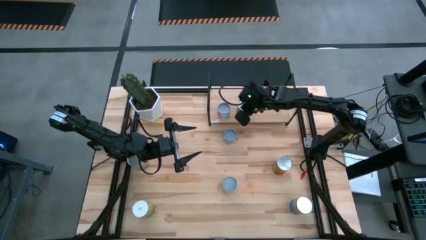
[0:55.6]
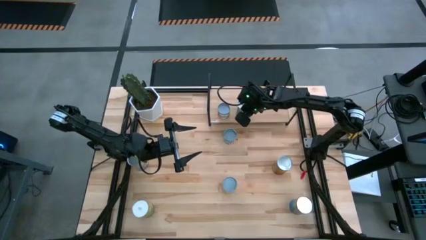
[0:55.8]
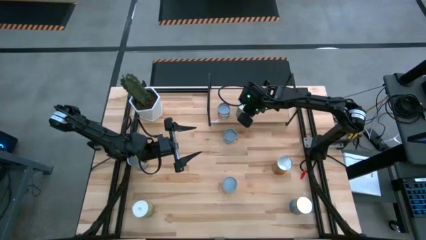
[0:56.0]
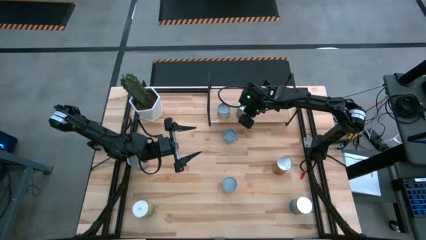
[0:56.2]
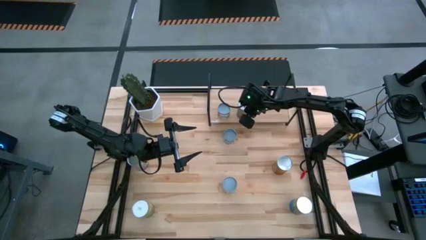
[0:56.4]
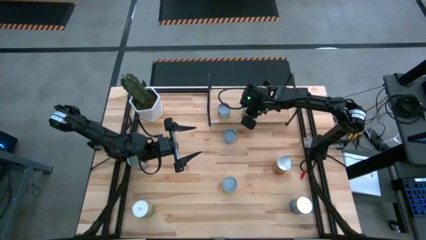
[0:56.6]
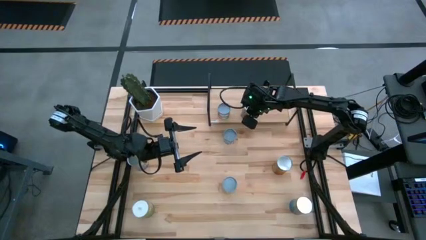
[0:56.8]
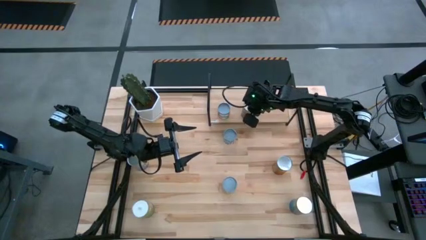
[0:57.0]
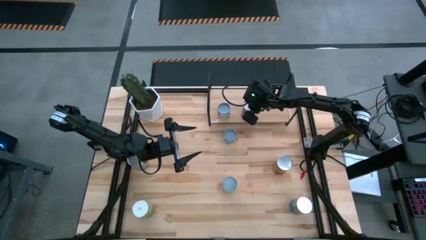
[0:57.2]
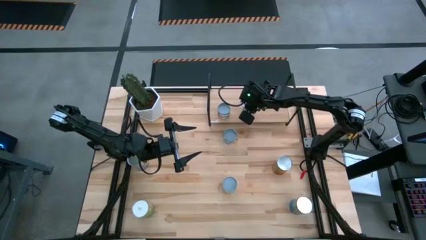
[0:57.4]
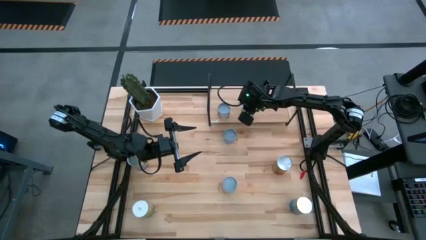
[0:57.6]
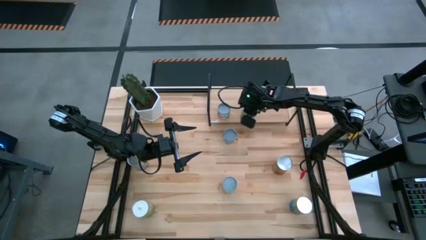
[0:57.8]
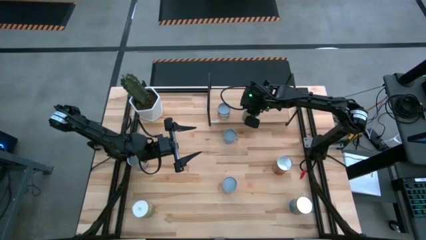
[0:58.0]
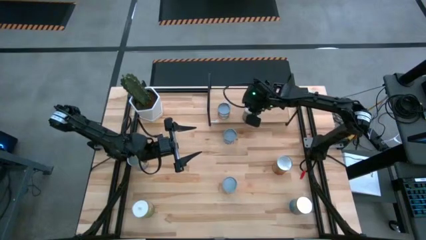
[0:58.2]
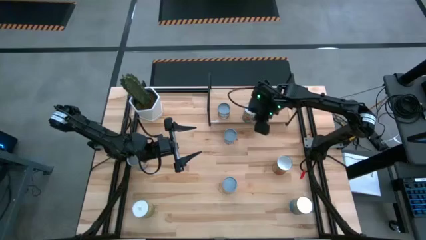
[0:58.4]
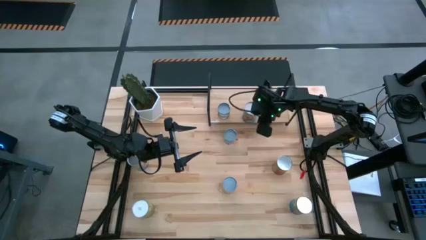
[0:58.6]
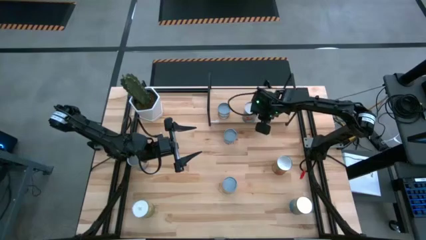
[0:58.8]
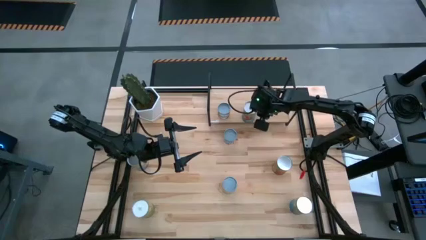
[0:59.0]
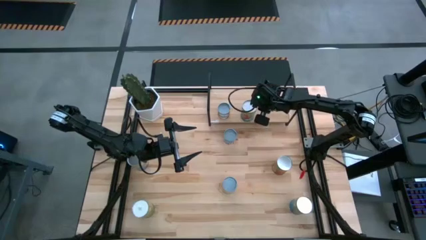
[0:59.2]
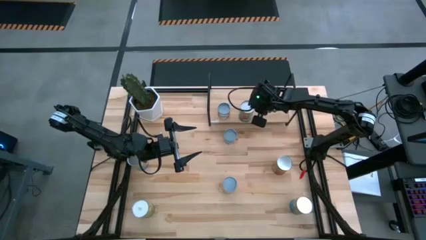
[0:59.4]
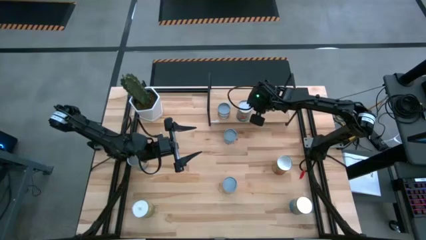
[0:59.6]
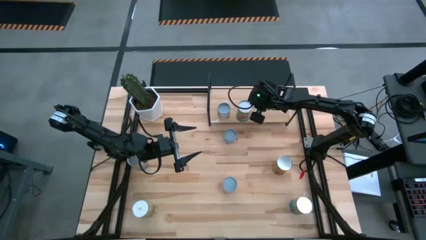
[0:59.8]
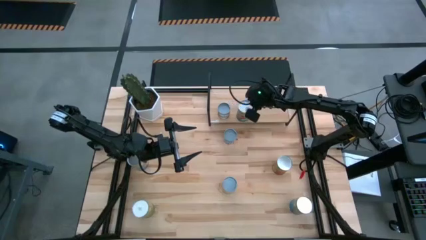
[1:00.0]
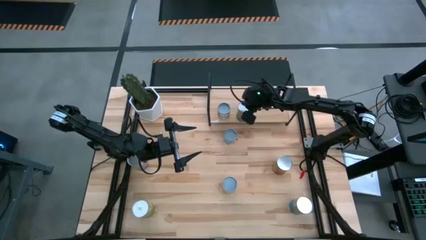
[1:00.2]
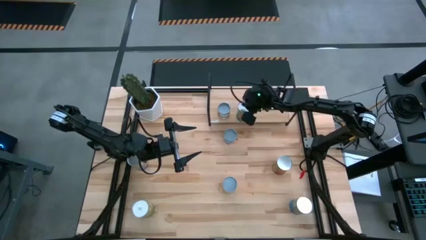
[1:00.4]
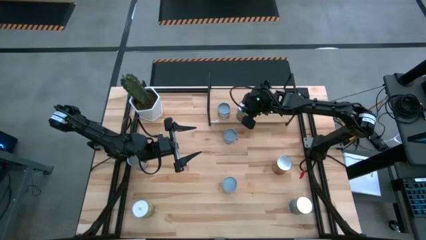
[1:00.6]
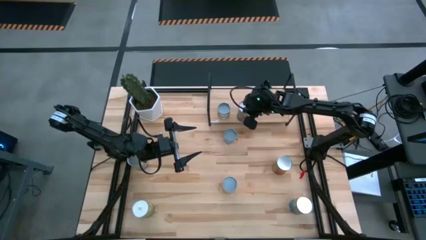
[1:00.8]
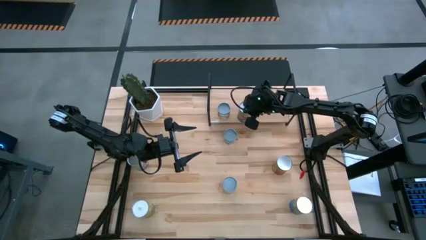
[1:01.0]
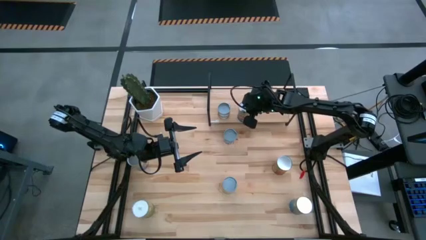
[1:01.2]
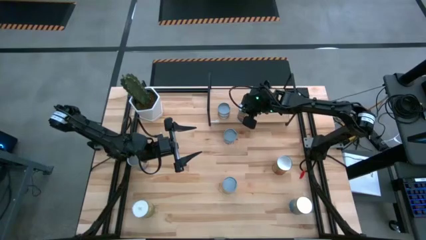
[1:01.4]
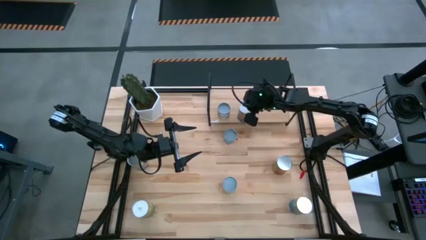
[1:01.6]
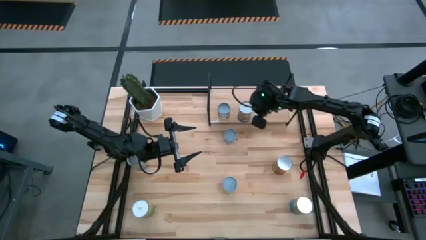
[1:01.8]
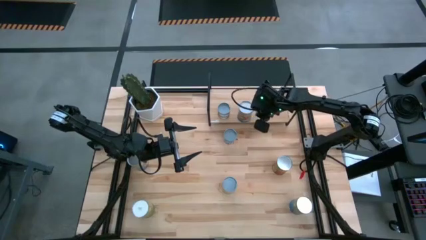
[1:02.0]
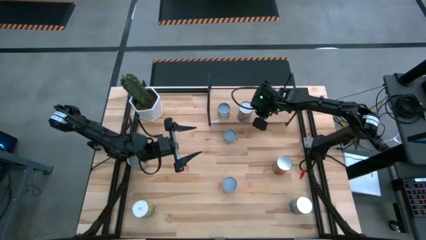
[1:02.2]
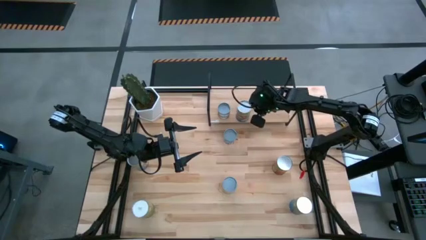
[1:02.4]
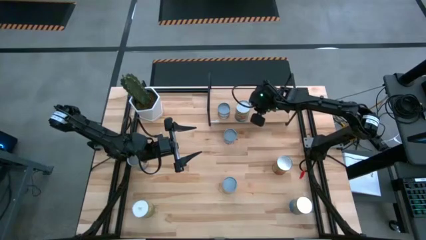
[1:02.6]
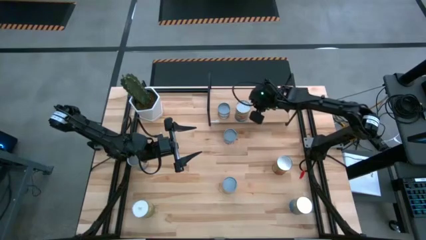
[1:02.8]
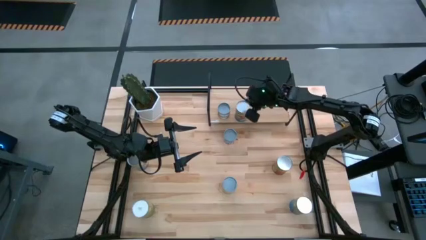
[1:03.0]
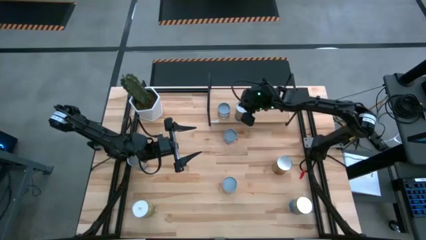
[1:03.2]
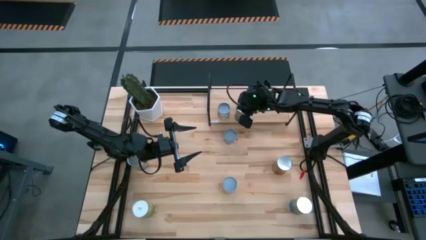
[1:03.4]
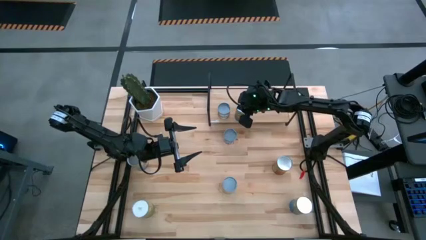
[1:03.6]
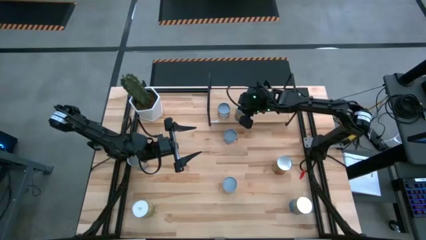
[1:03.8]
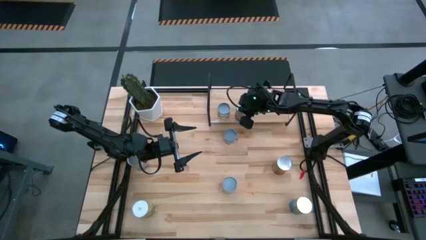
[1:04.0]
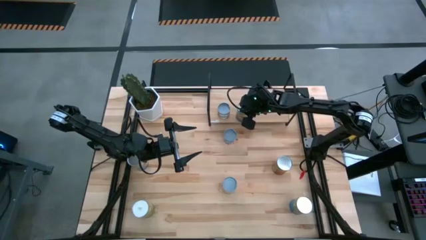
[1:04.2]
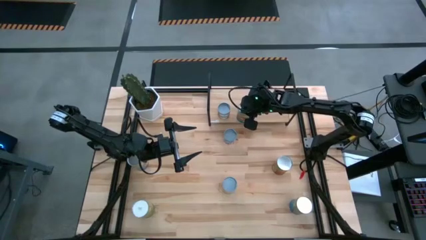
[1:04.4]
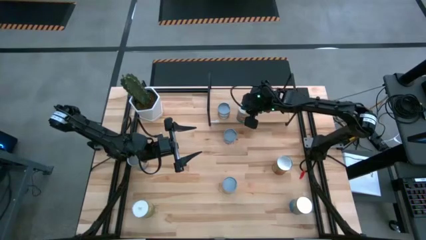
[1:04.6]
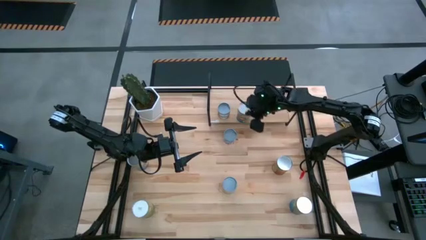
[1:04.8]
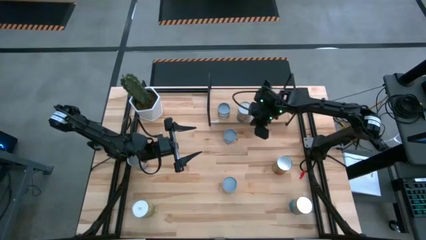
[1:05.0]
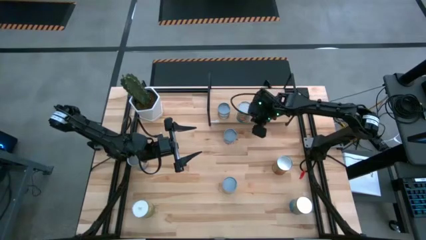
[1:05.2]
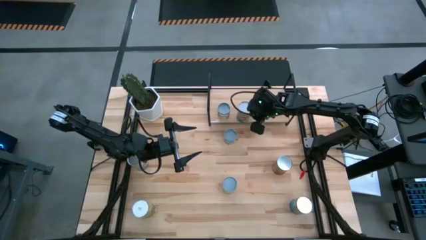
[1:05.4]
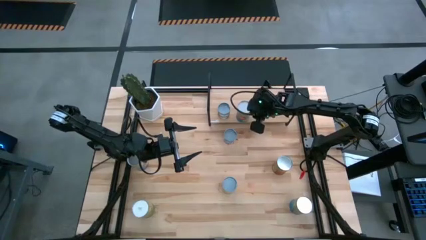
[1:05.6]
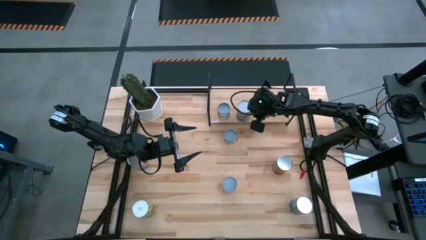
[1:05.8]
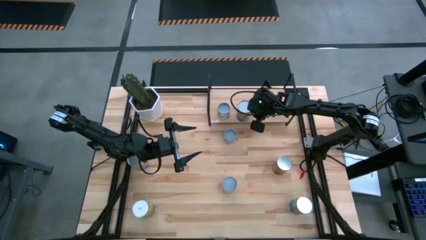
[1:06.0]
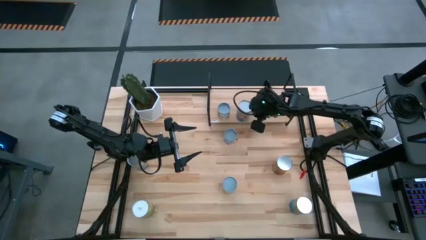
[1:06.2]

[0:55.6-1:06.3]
Task: Pick and place cans onto a shelf
Put the canned tomatoes on the shelf
